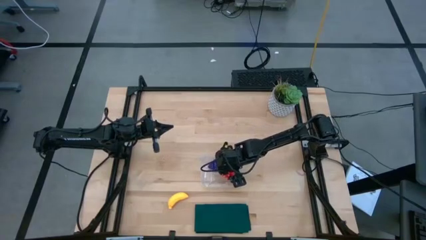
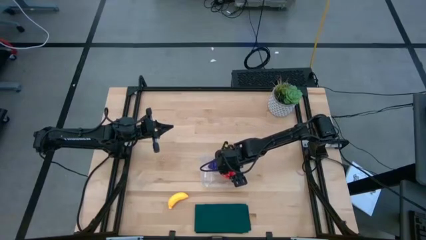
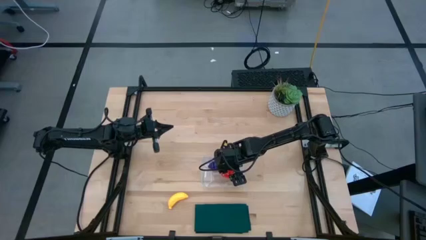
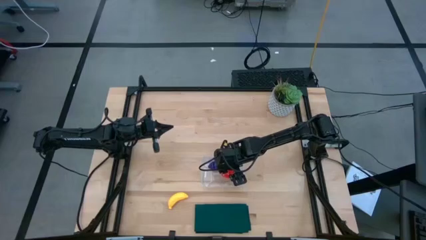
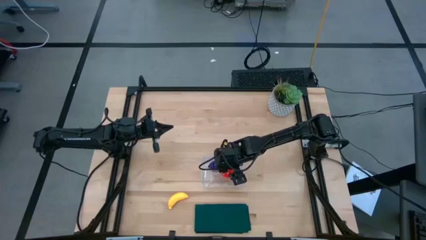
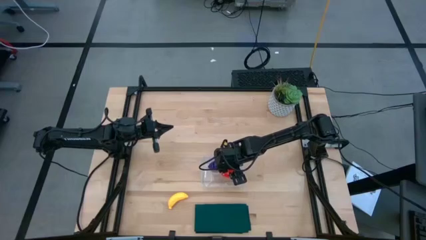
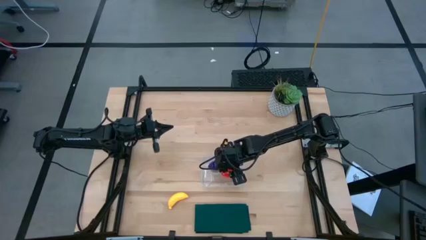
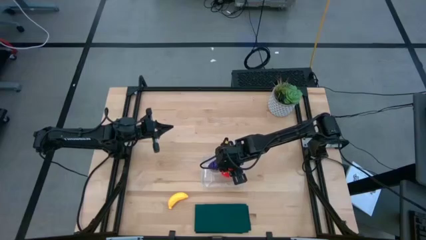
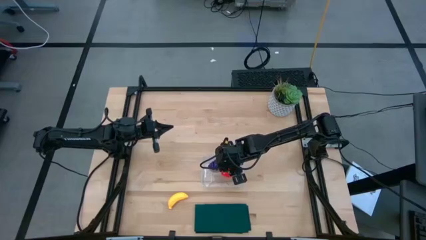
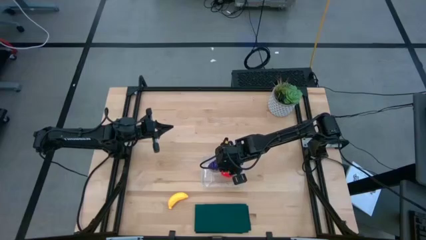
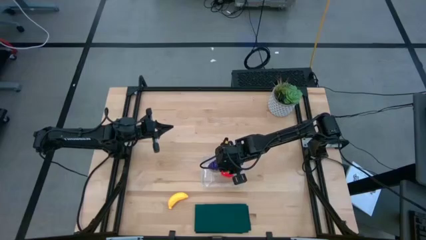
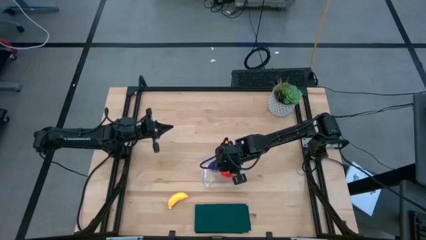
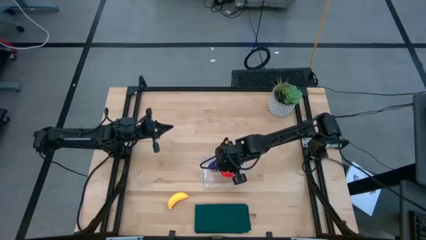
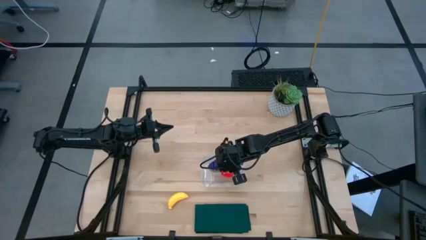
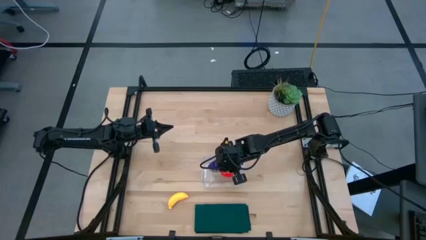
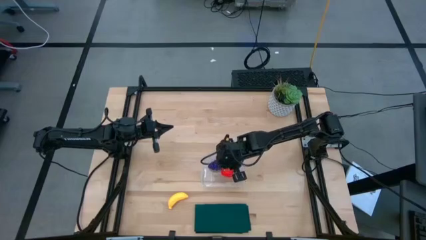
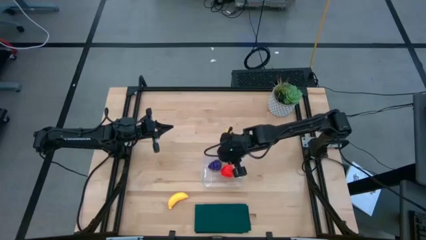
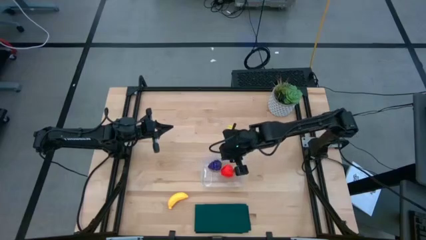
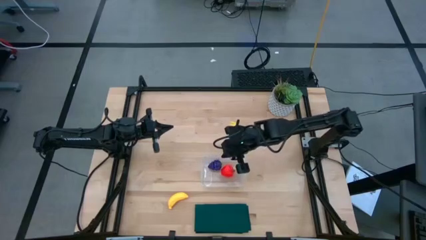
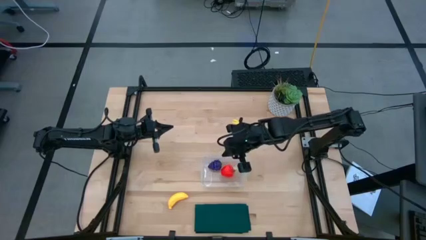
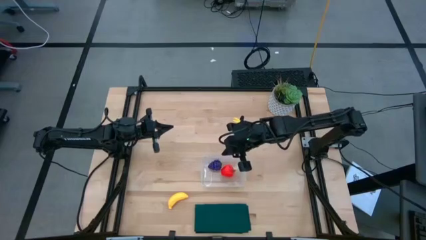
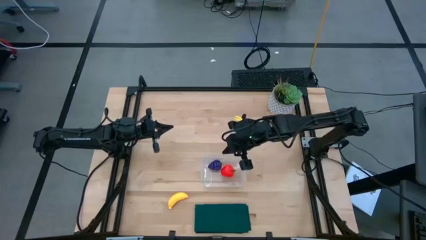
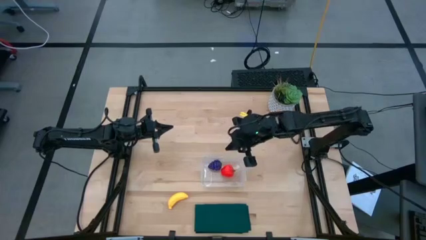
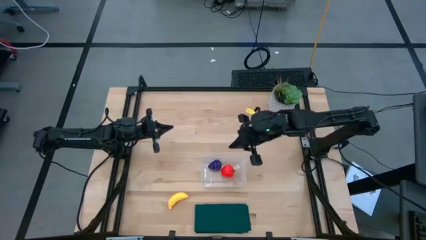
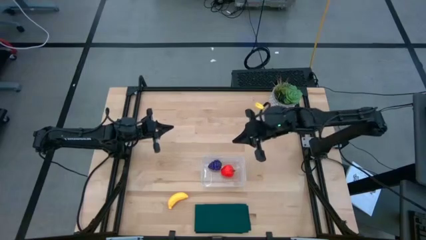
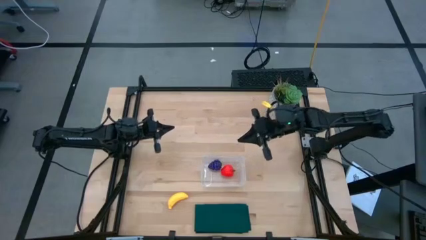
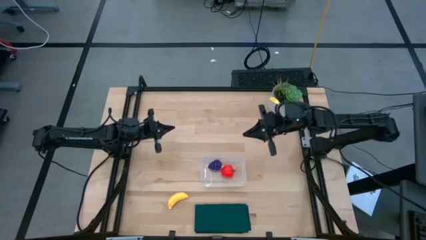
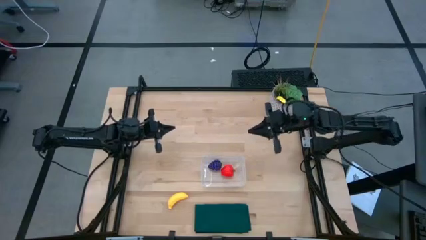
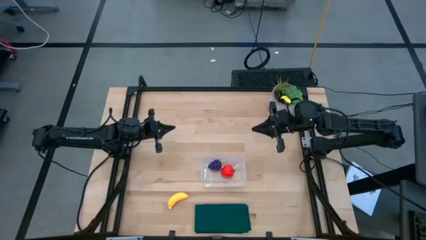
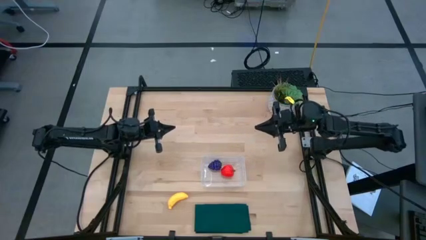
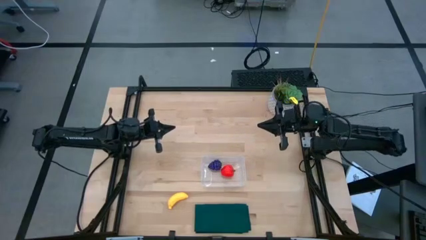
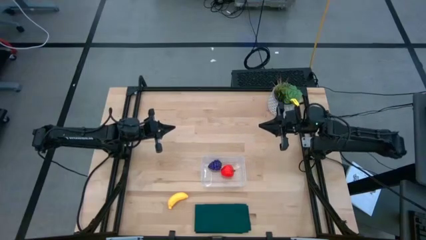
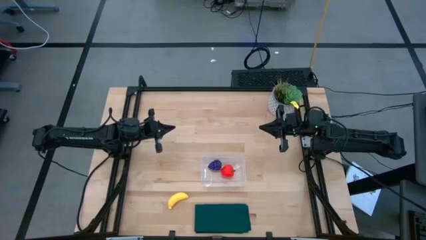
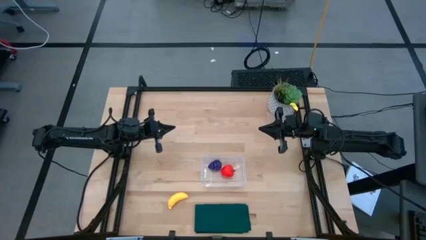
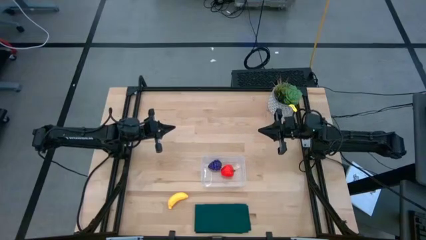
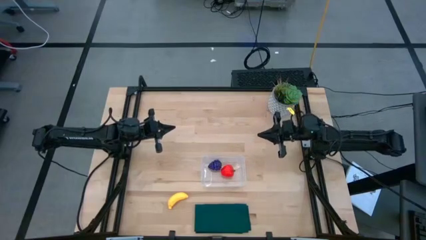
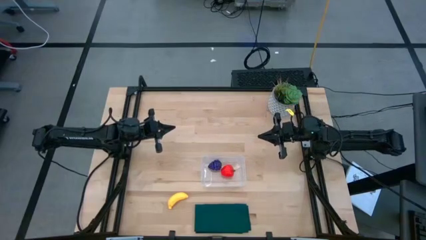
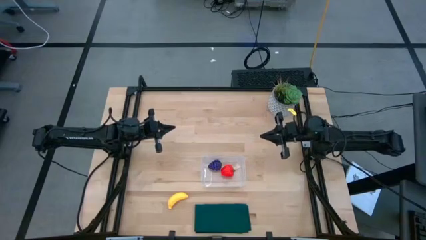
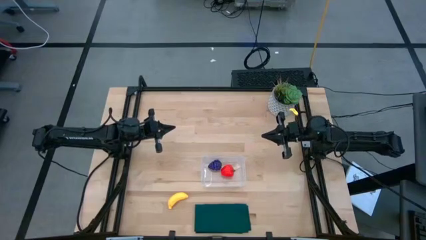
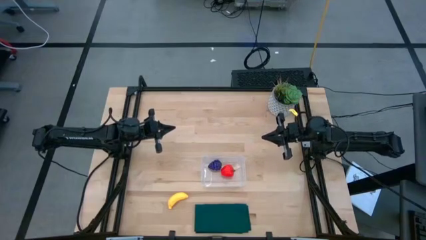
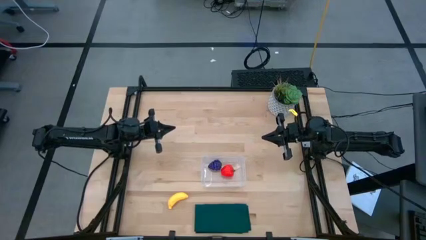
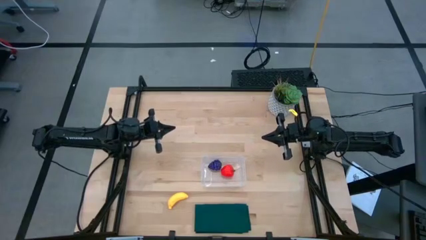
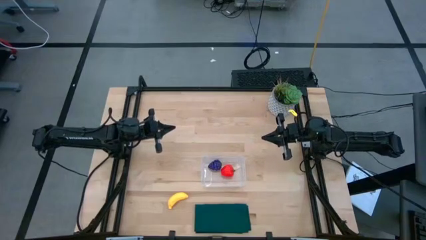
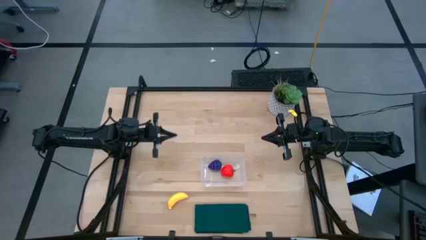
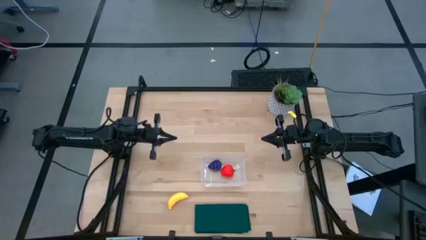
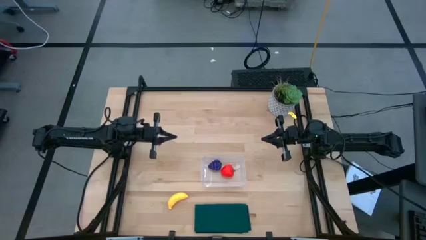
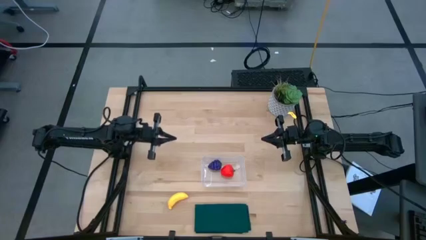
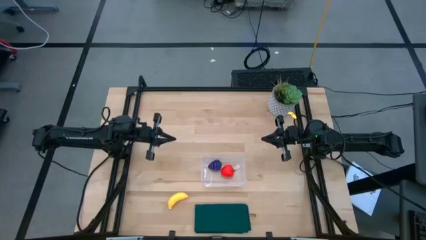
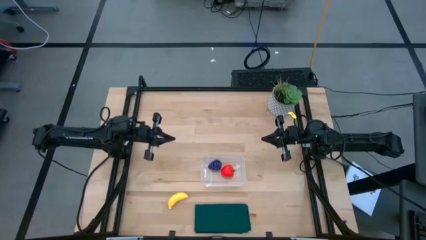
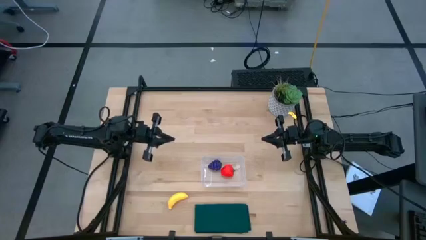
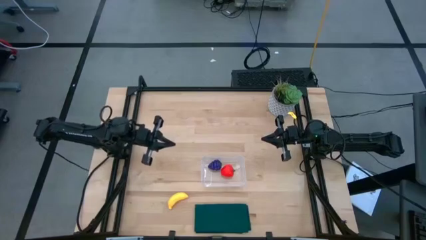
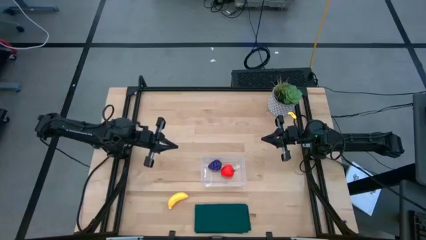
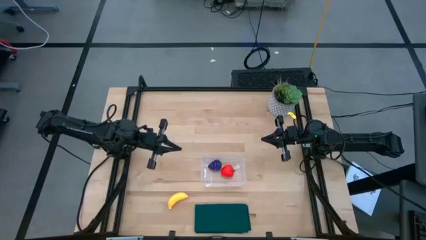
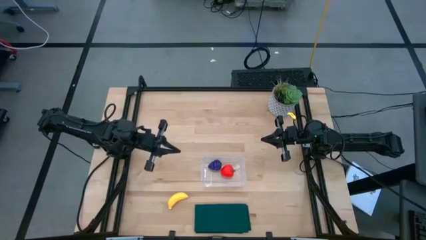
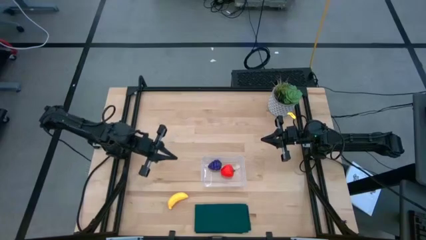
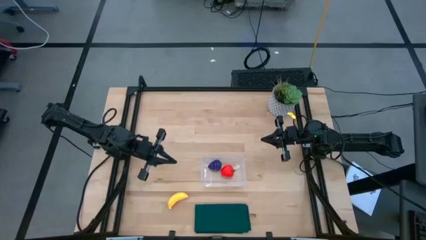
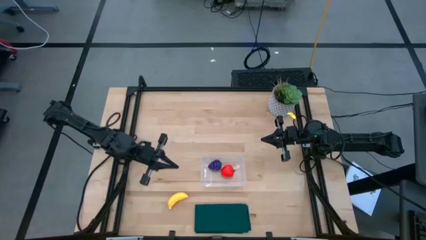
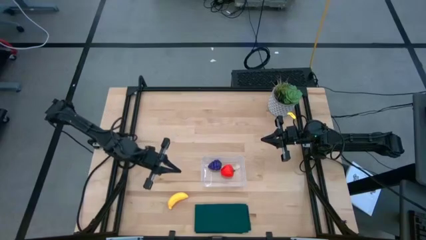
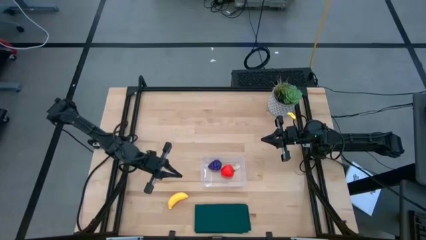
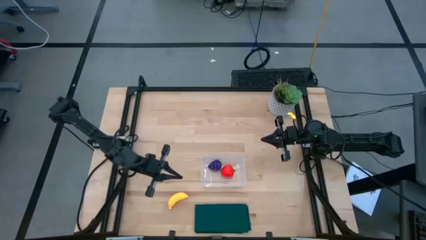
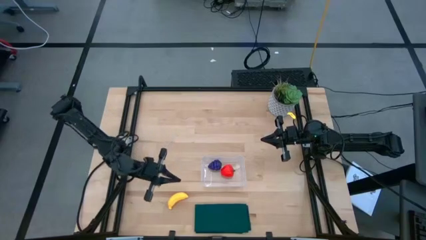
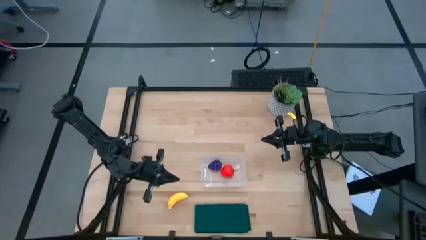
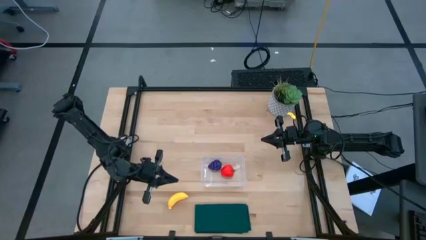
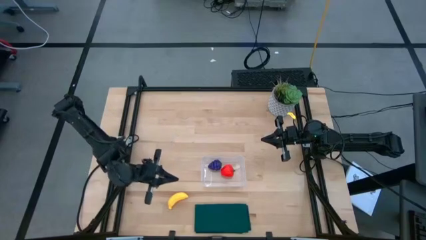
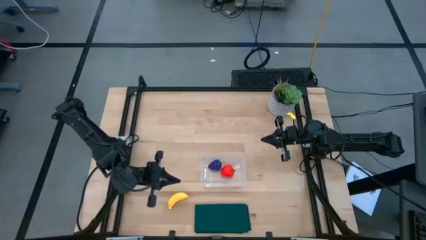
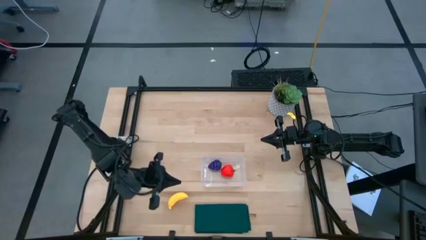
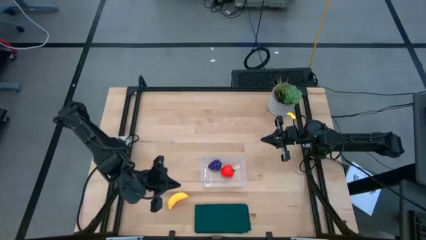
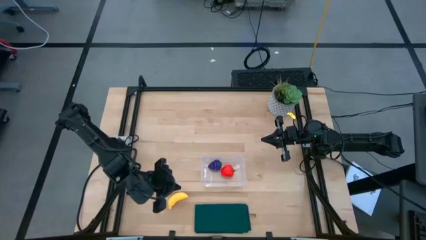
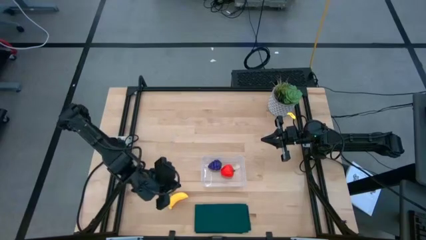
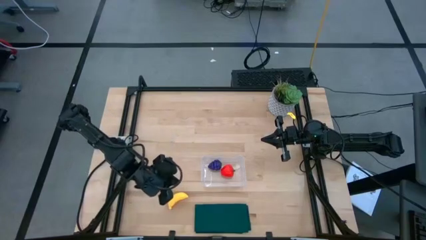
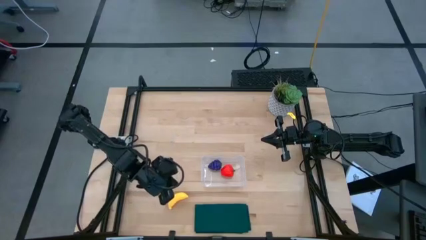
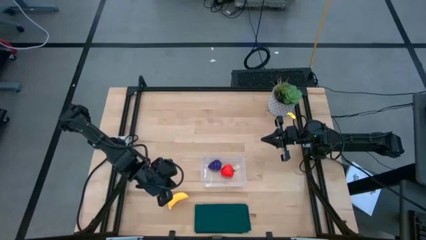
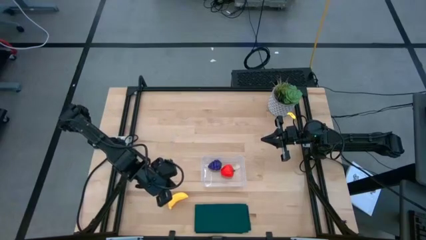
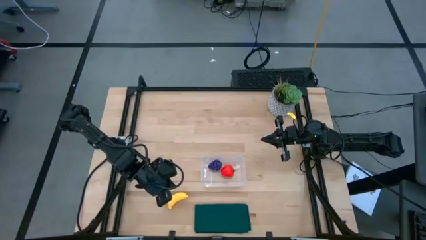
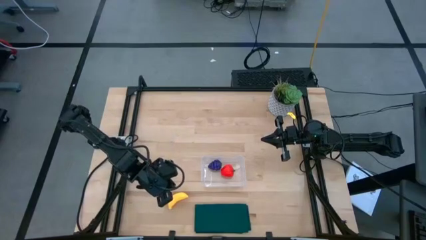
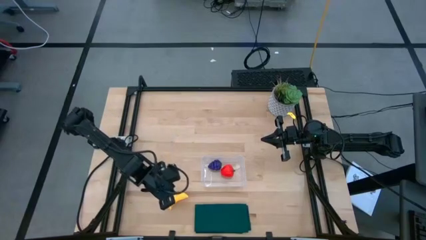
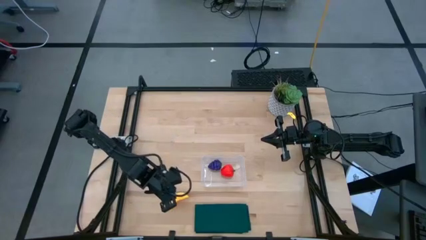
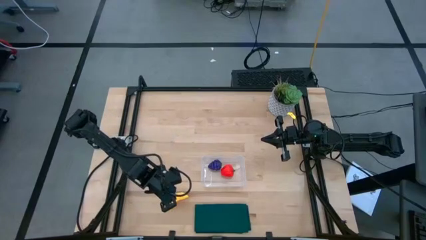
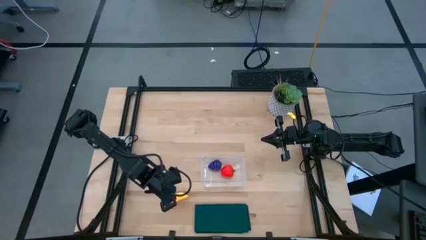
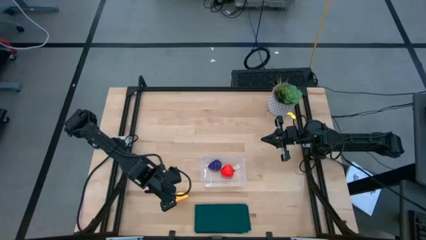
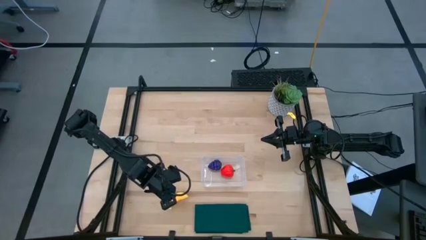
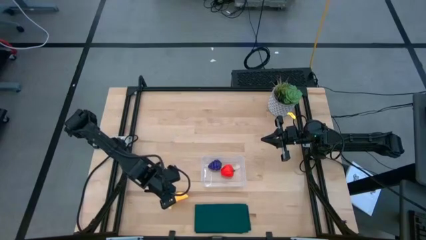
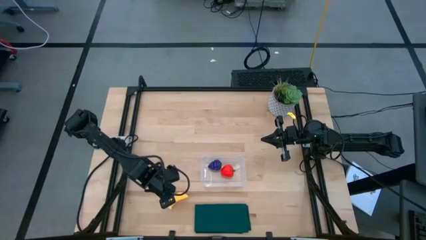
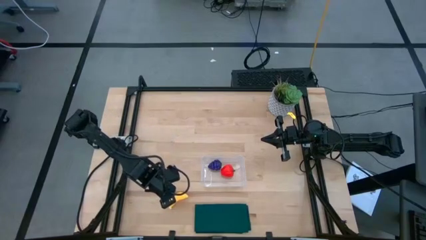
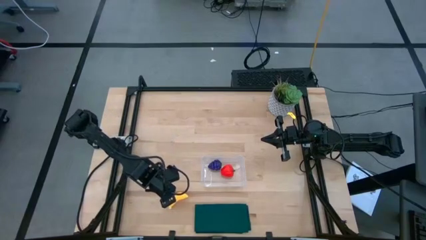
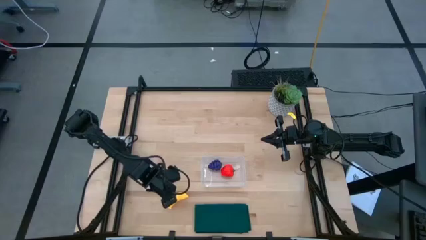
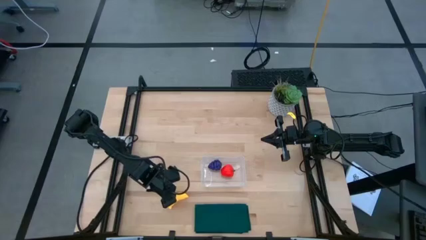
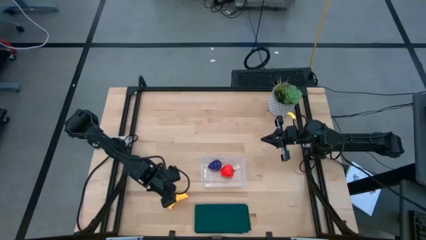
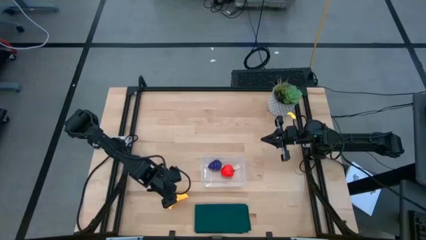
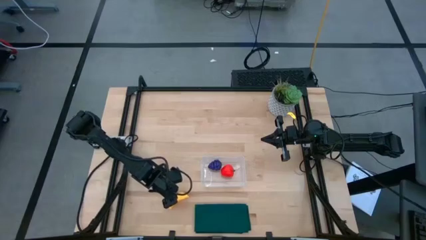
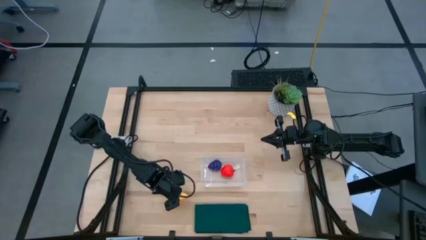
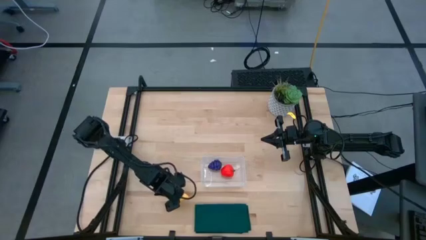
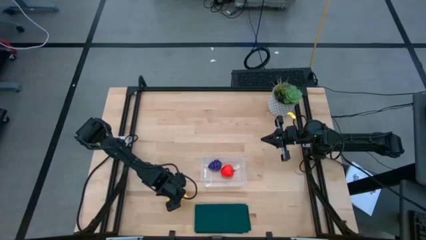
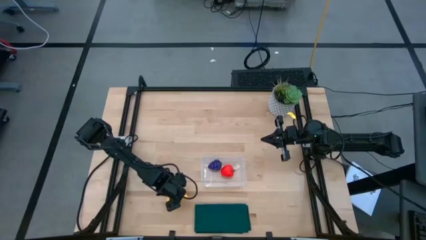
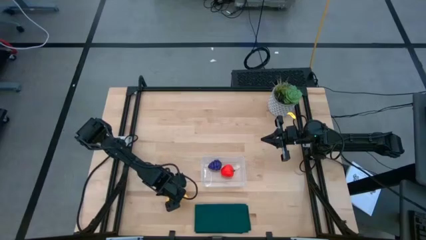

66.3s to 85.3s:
Task: Pick and placing Produce into tupperware
Put the banana into the transparent bin
